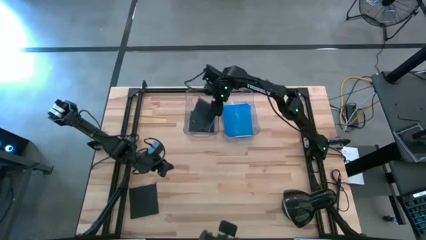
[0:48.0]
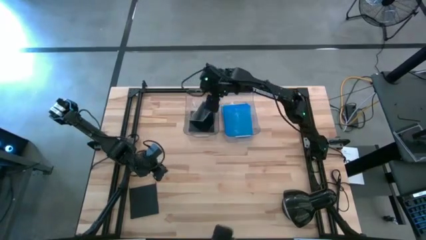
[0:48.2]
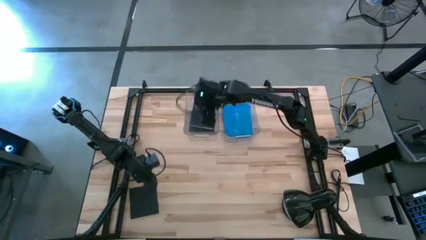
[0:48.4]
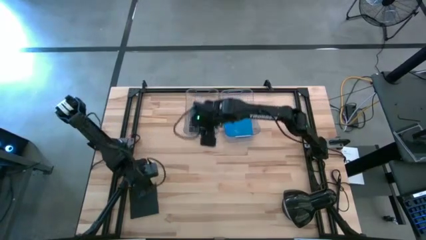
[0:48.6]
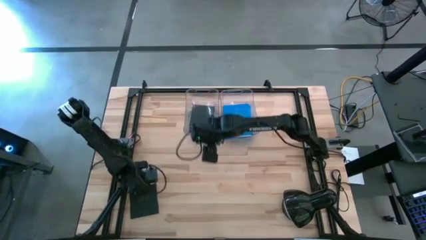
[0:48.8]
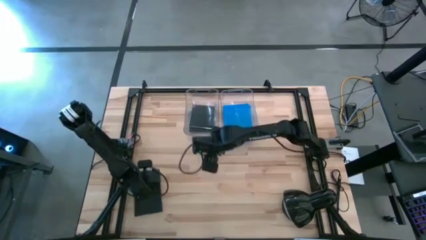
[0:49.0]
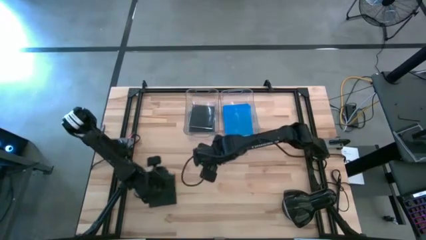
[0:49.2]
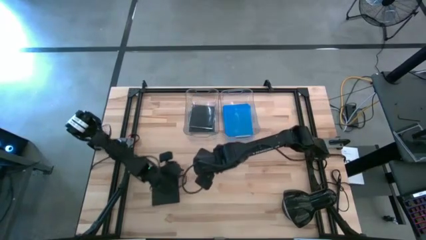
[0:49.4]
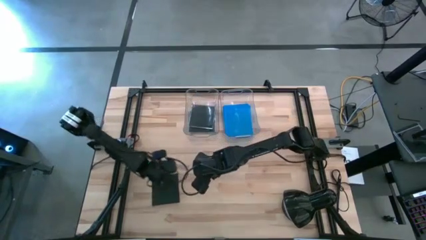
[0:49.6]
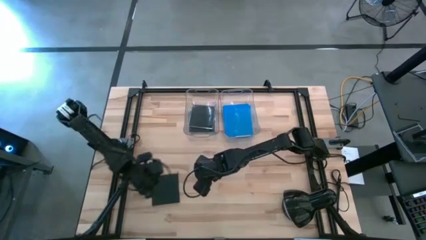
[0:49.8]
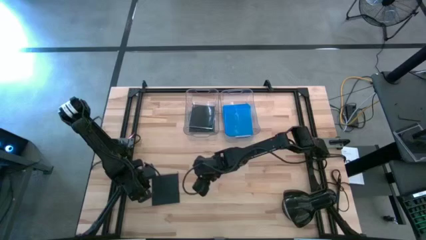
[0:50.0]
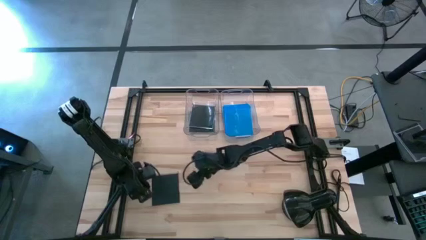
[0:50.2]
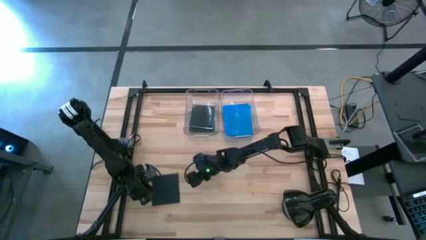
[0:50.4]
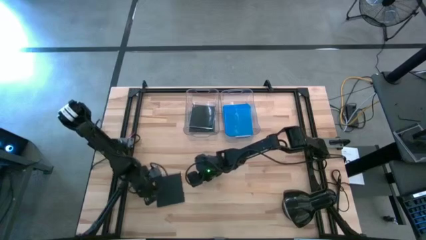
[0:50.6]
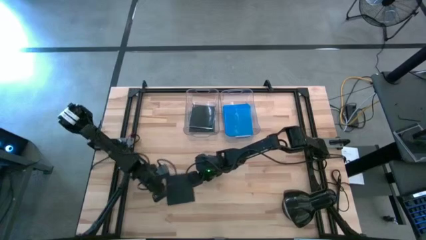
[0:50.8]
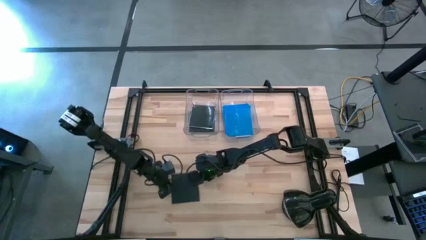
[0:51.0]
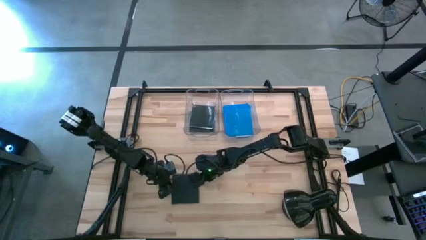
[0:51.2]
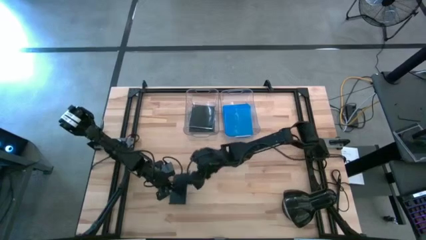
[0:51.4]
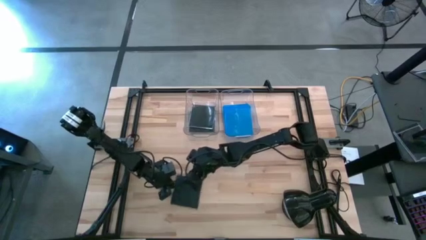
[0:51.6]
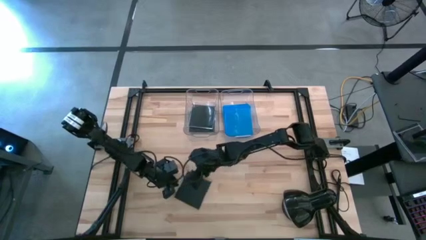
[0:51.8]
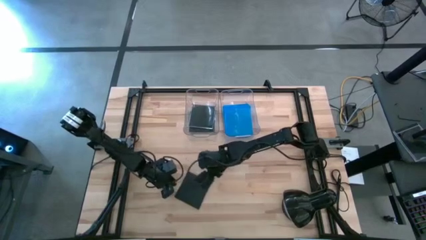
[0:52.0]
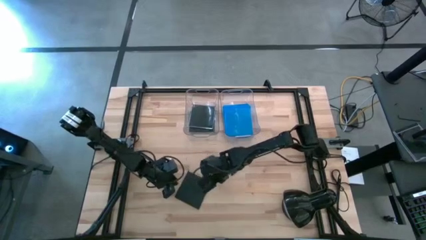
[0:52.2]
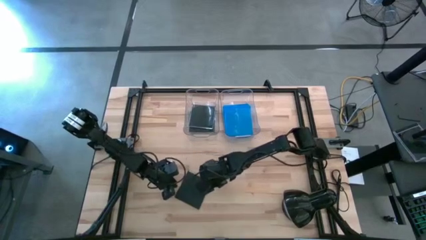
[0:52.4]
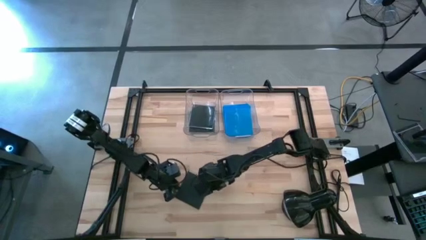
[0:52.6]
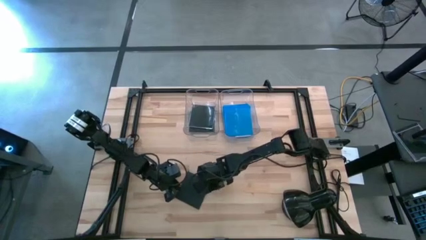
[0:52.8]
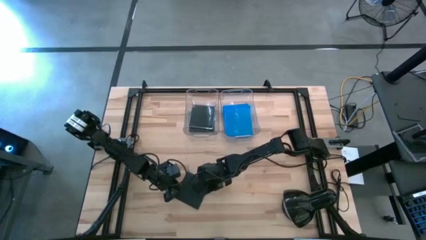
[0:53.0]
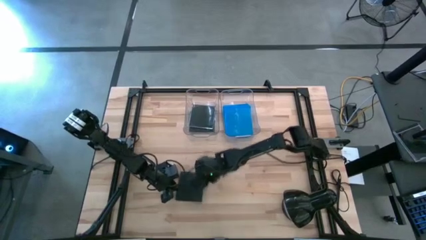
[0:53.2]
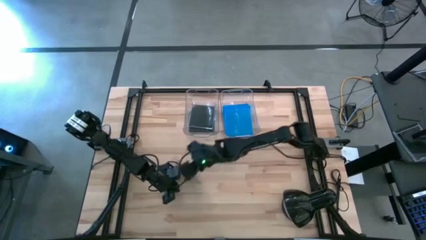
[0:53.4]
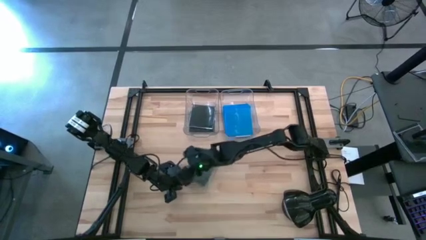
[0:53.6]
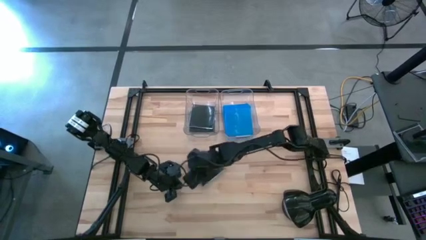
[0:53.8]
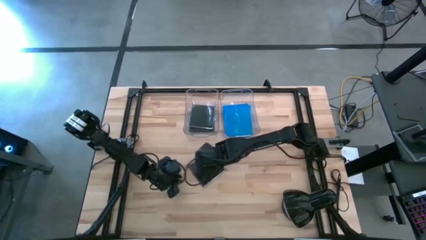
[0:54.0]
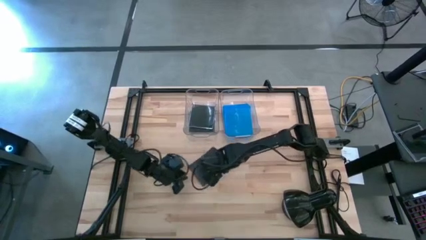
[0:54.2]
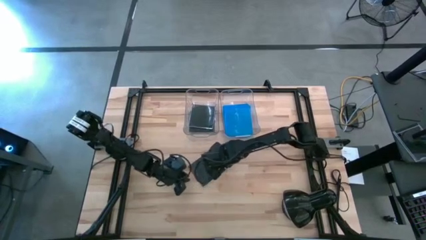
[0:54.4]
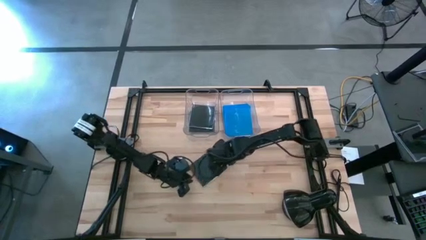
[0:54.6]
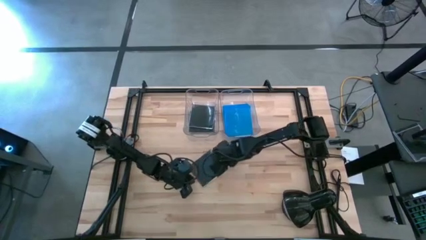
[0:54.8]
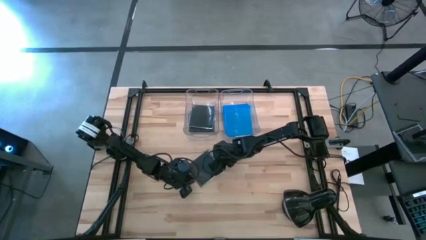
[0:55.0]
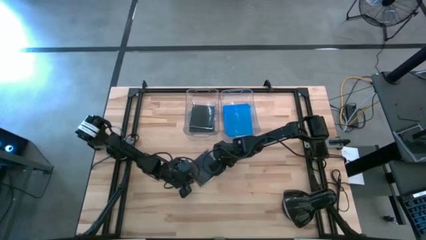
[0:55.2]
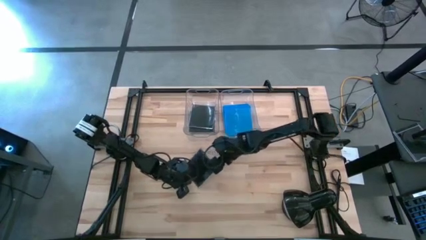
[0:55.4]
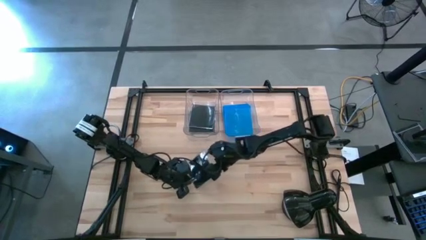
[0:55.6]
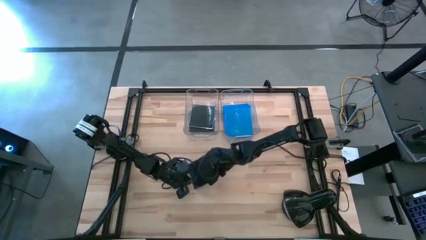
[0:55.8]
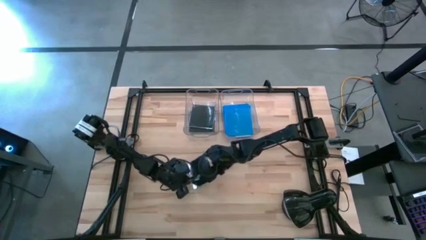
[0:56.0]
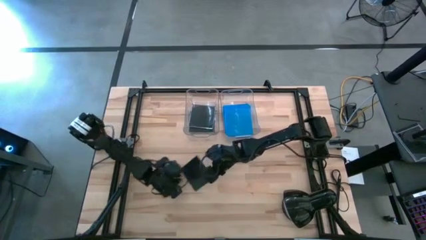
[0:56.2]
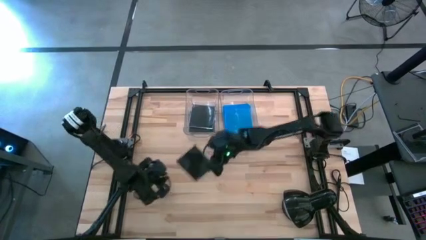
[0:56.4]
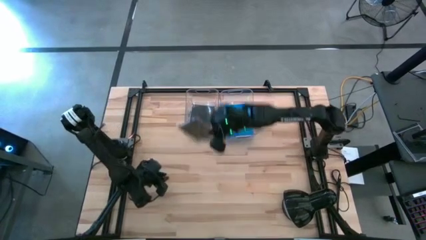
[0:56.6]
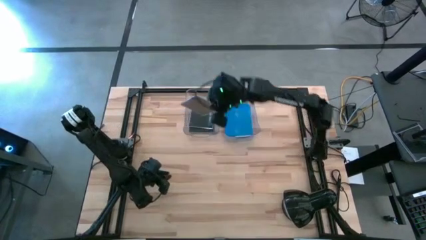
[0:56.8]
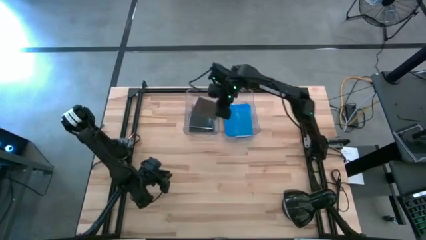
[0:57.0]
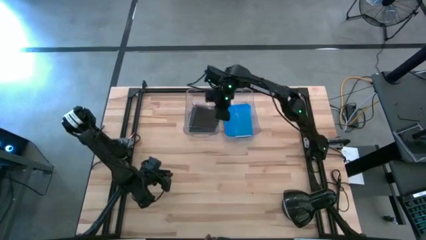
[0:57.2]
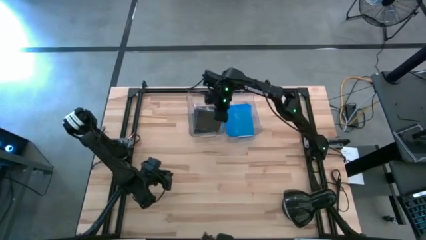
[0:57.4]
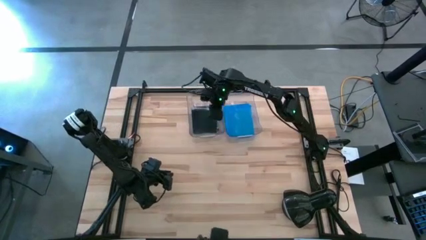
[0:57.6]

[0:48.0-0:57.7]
Task: Pick & place jewel cases by type
Put the black CD case into the left transparent bin

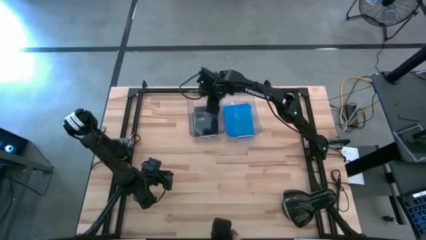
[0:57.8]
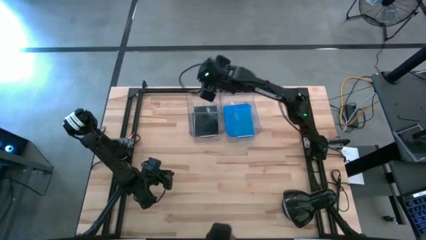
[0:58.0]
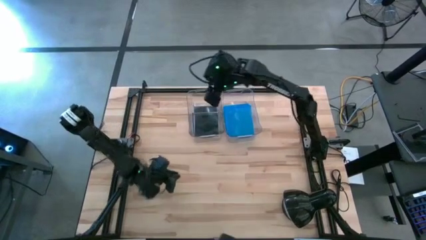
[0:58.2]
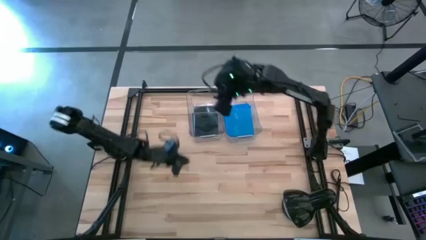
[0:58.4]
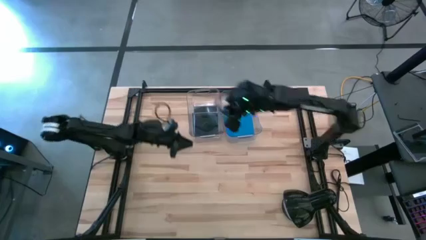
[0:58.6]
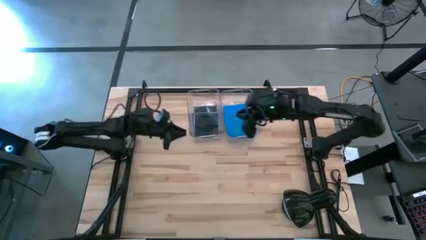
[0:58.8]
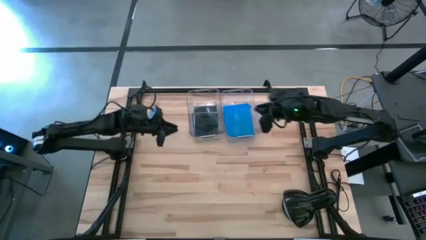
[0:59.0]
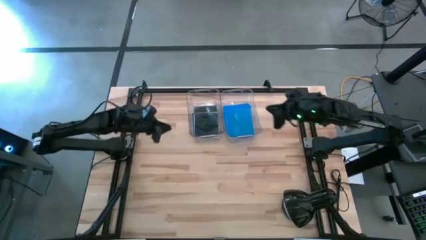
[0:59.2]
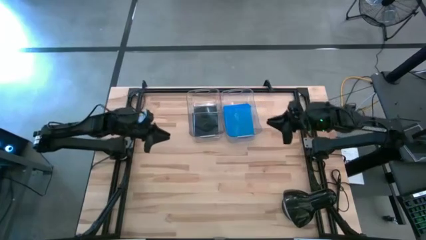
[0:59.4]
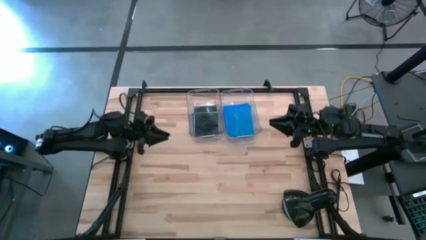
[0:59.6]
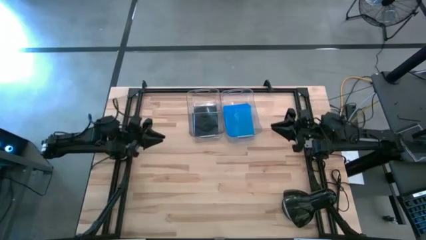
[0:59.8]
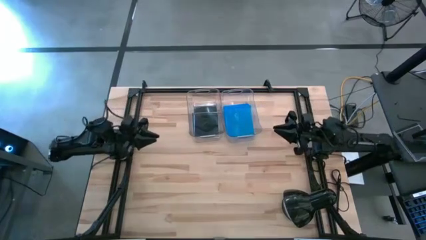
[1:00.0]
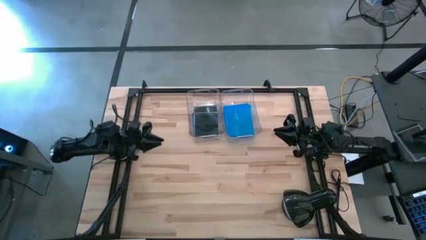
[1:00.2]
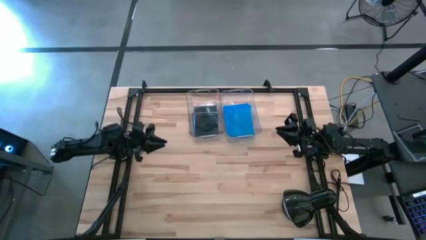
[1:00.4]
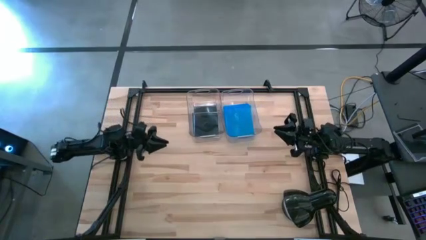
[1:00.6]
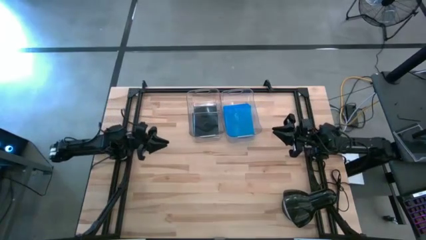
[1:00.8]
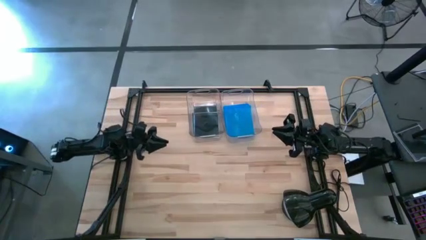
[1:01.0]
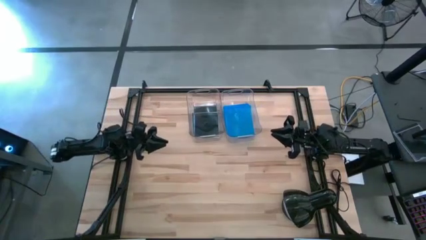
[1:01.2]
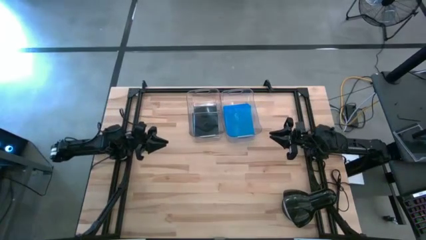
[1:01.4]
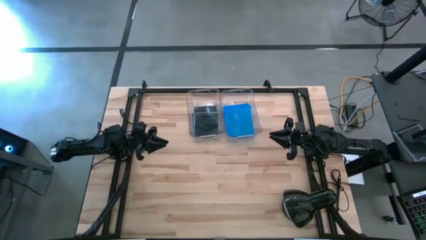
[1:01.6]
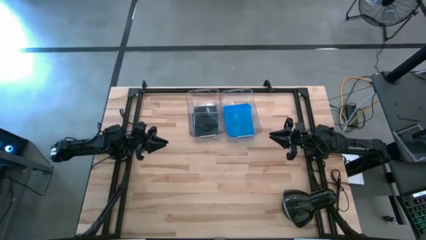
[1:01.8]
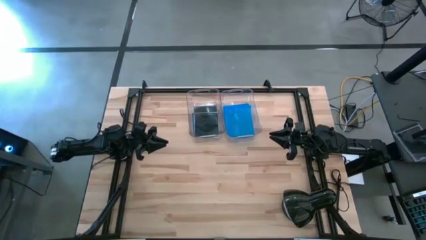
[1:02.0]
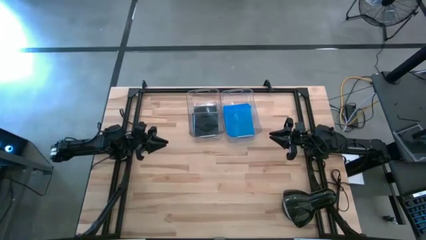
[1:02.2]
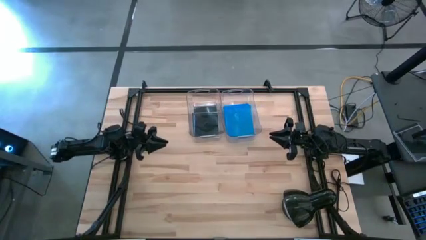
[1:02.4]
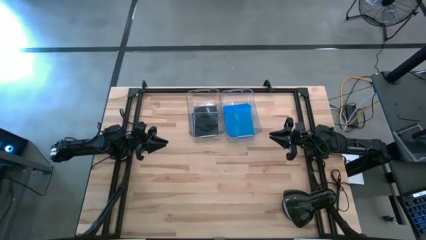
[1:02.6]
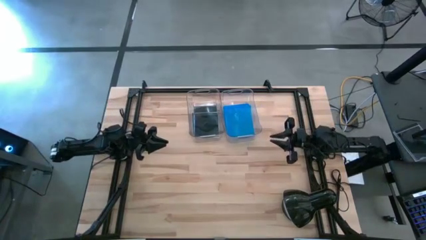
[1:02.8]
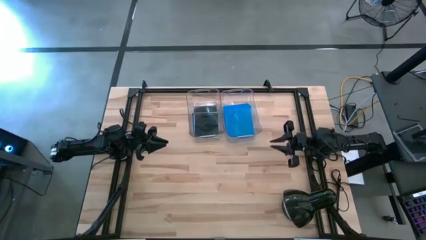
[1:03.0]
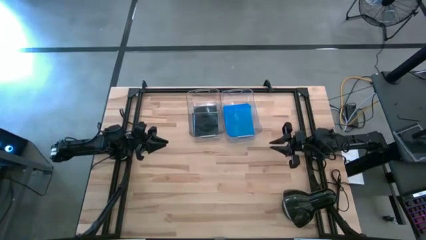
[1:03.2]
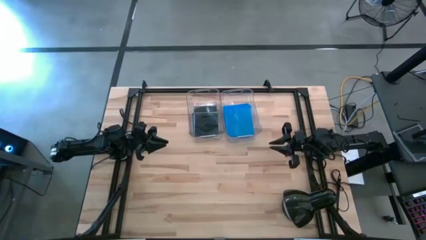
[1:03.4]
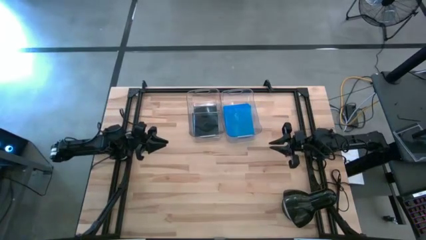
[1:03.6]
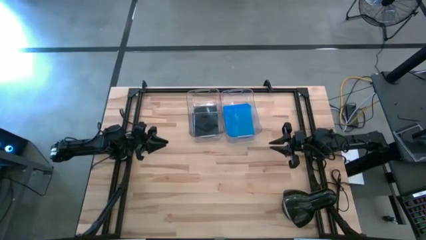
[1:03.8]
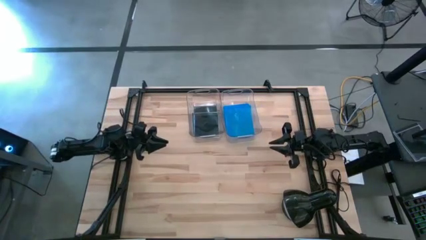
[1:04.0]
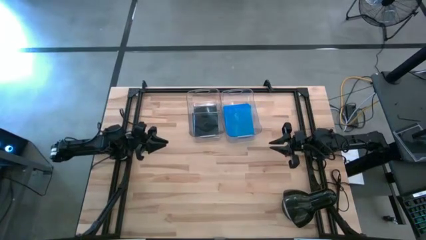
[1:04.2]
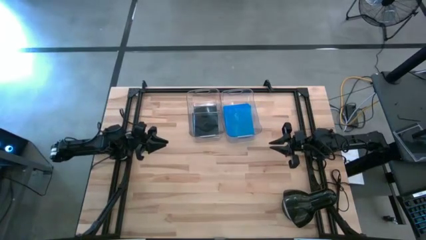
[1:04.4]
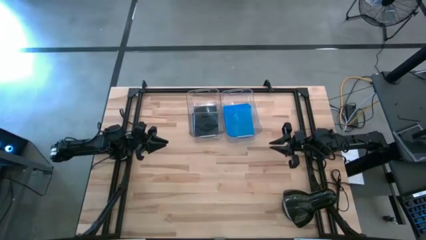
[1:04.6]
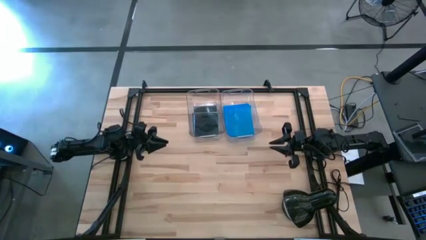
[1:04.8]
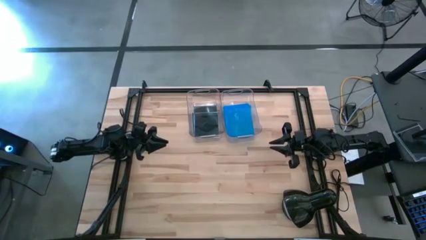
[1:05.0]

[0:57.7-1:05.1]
Return to Home Position
